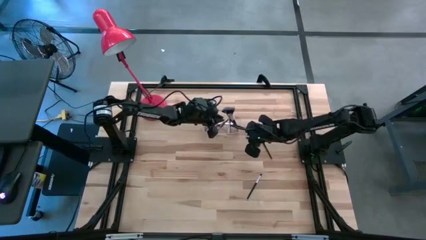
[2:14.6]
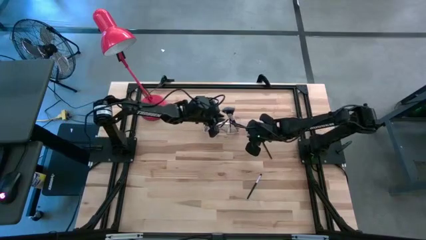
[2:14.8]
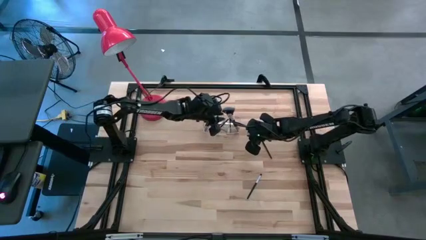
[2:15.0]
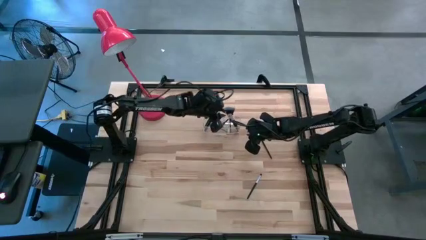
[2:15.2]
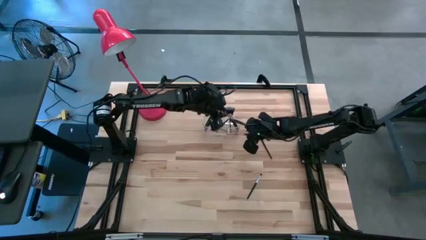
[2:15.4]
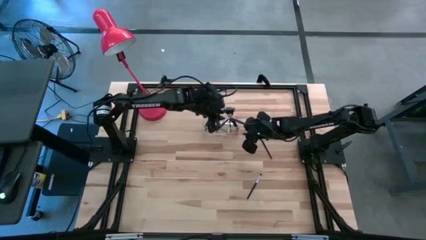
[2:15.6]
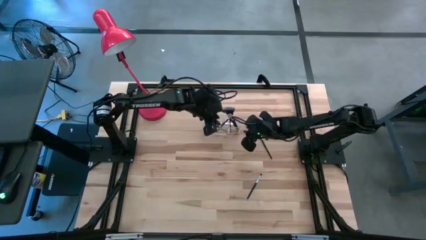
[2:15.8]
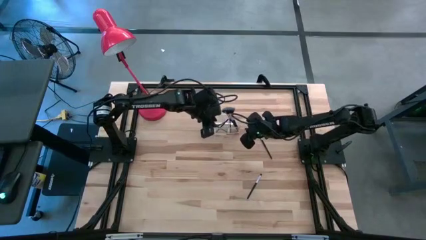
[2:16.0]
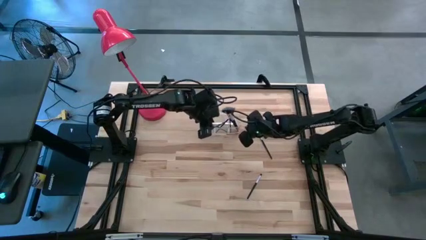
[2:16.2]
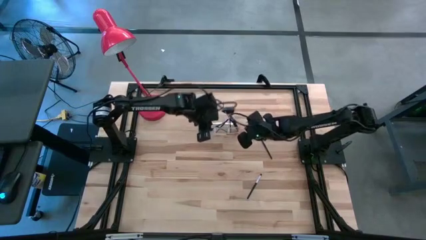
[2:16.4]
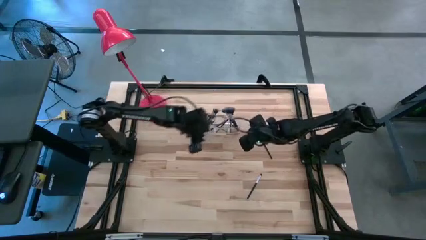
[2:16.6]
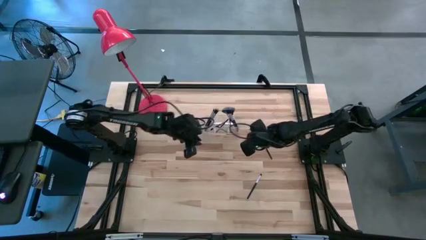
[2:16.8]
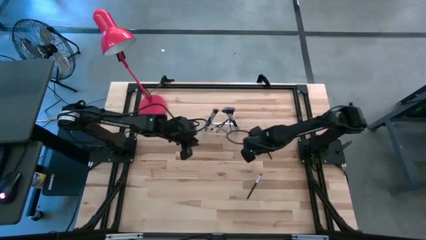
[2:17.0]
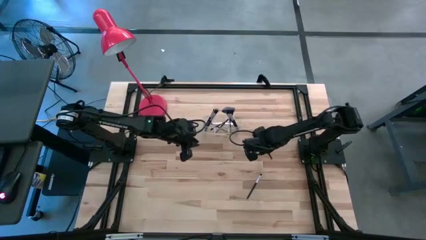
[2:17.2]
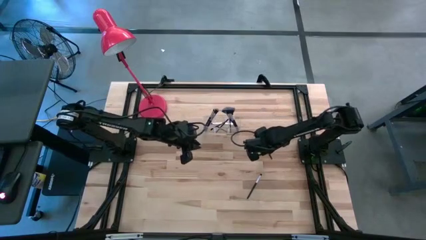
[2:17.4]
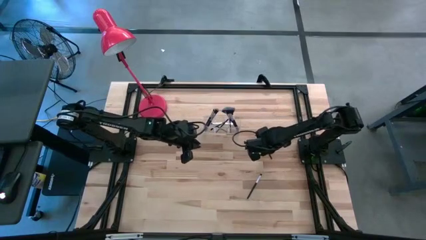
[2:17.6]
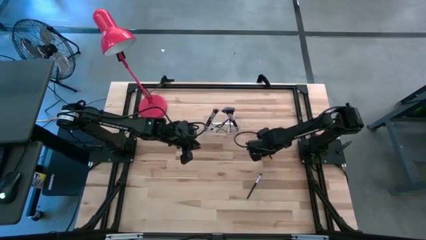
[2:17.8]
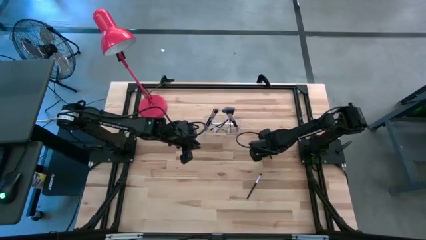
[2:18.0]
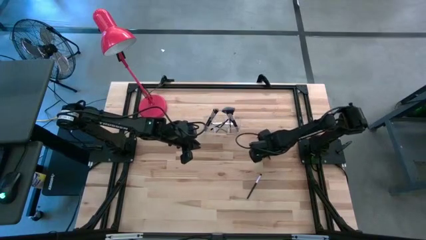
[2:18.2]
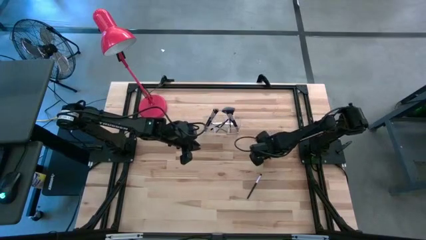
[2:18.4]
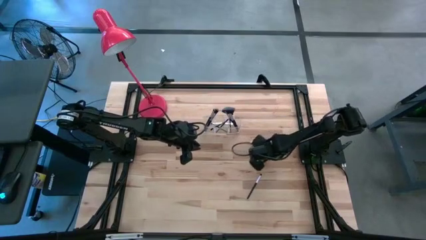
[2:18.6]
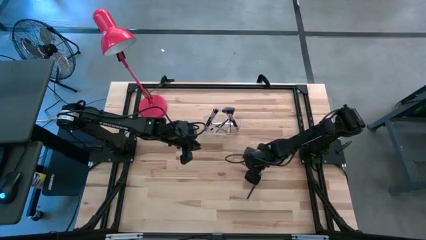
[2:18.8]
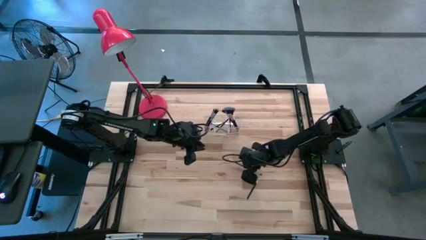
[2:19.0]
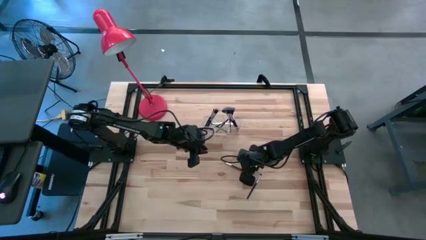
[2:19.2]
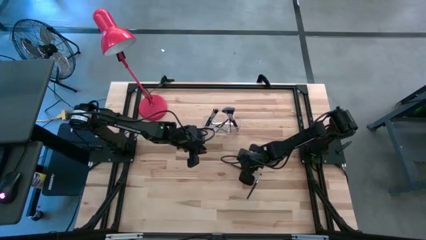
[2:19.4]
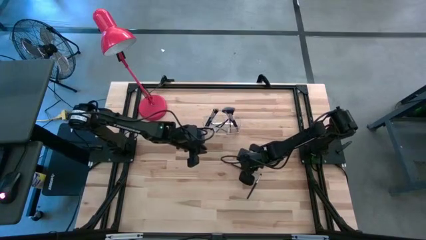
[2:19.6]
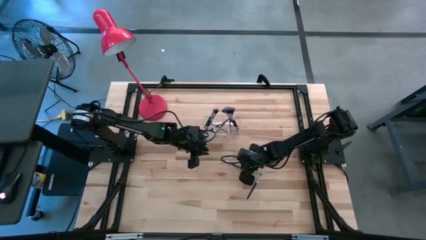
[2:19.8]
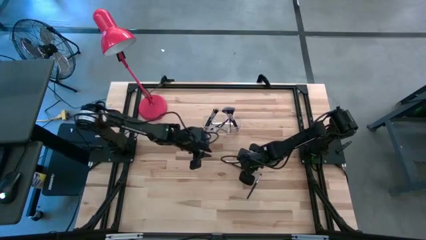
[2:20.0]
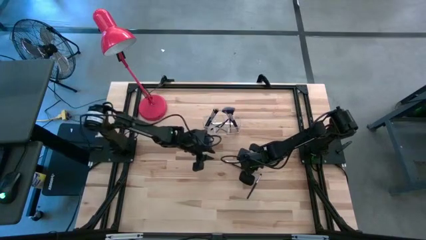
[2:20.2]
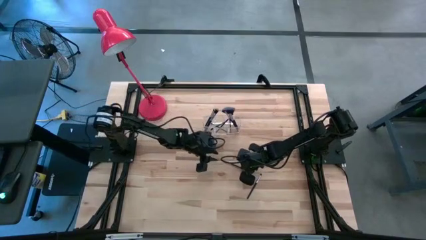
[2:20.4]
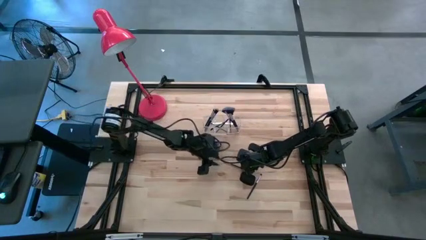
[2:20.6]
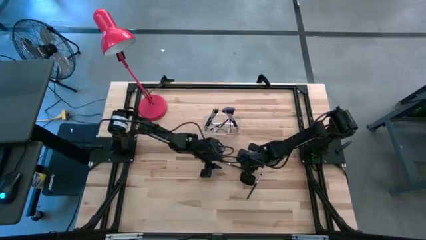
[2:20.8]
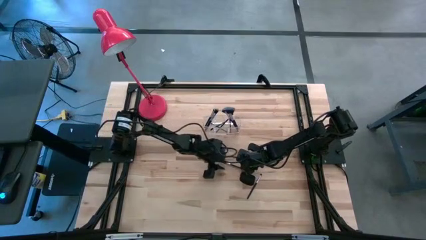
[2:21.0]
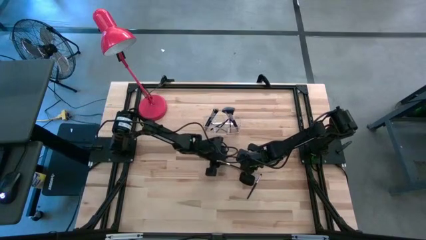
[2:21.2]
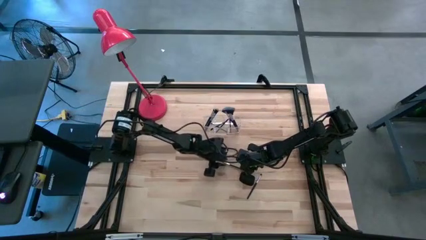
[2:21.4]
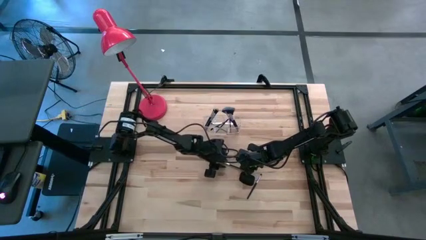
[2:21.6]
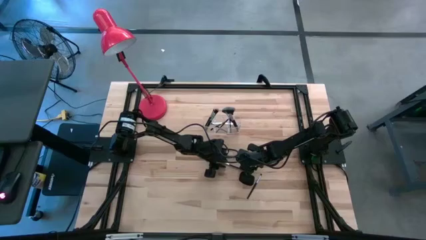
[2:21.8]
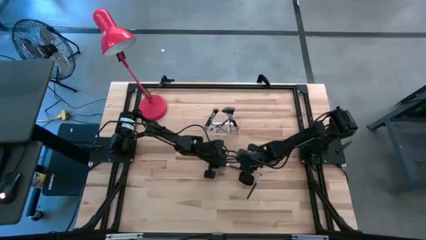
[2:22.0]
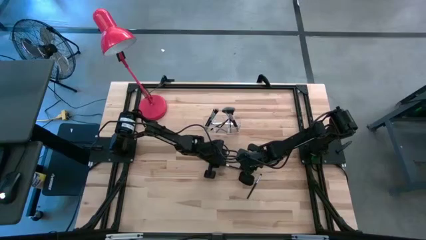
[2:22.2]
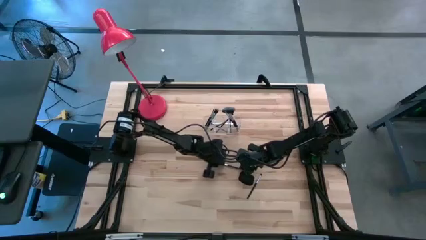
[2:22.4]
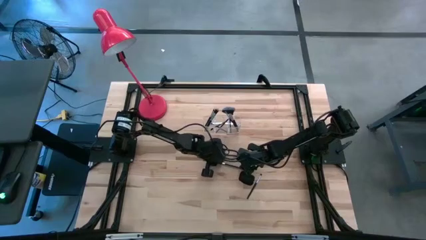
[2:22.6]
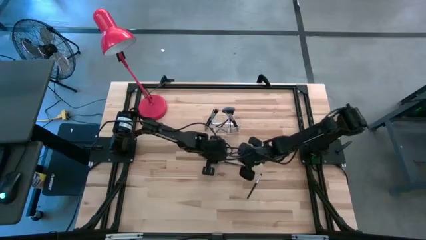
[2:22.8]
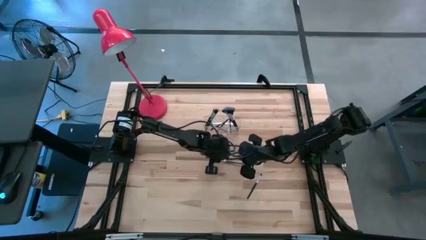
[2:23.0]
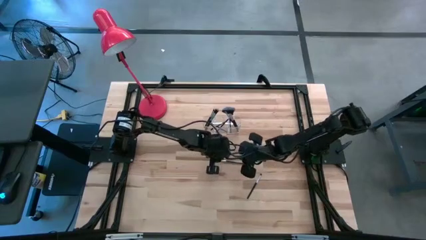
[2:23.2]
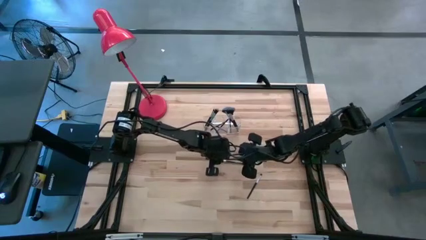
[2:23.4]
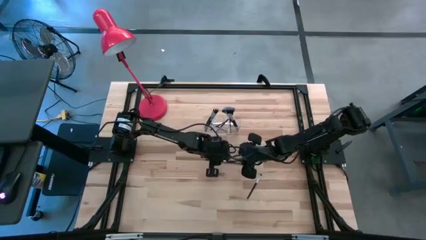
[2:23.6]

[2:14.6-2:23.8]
Task: Pick & Place Makeup Supplies
Put the makeup brush into the transparent organizer

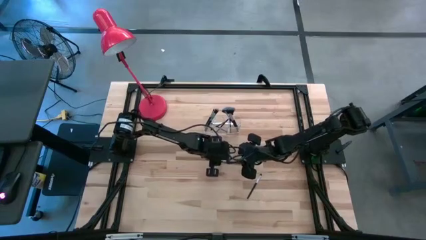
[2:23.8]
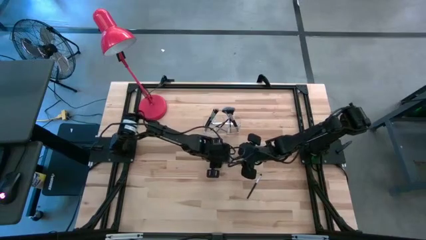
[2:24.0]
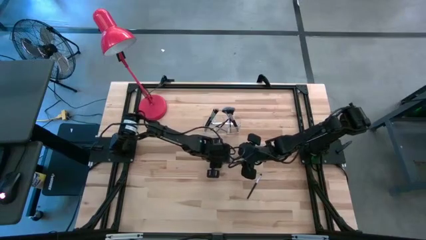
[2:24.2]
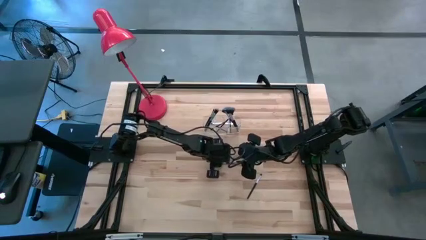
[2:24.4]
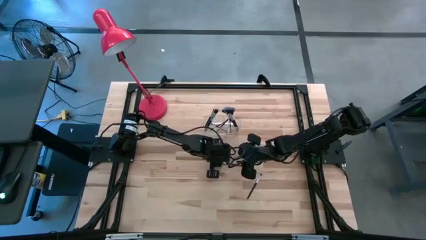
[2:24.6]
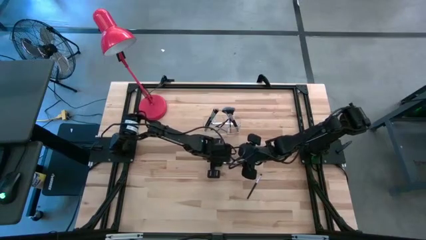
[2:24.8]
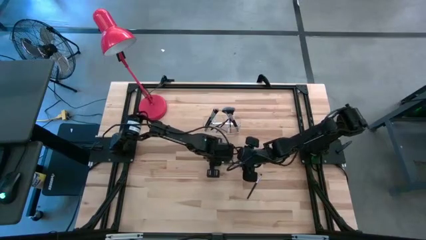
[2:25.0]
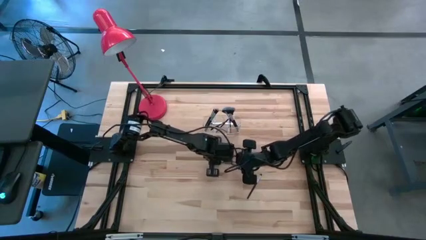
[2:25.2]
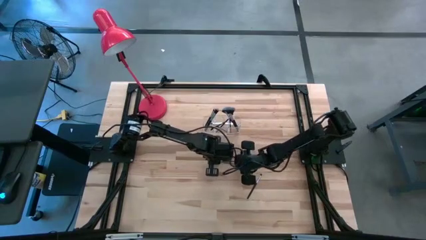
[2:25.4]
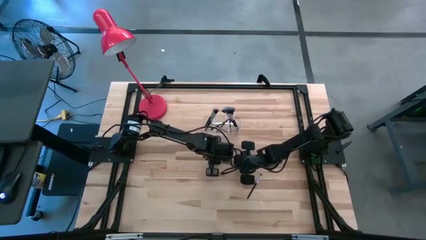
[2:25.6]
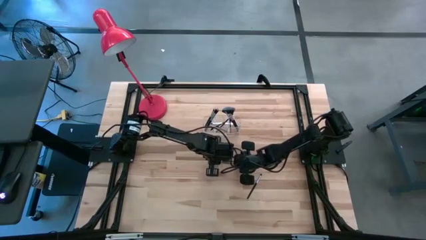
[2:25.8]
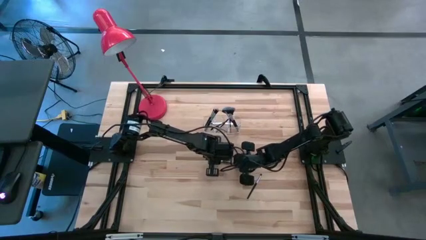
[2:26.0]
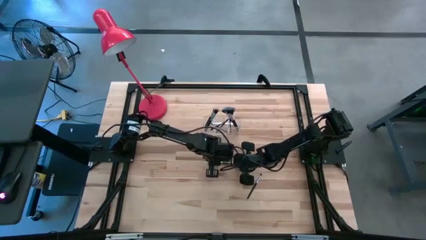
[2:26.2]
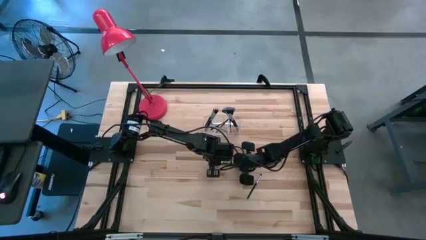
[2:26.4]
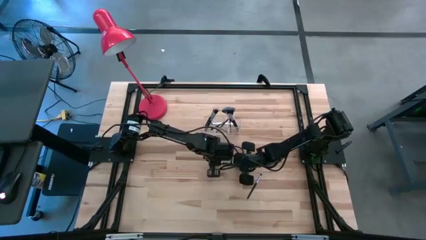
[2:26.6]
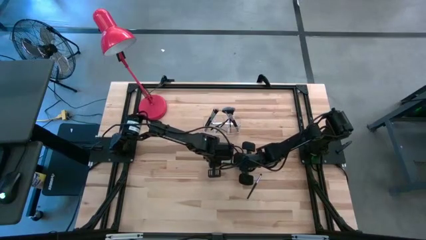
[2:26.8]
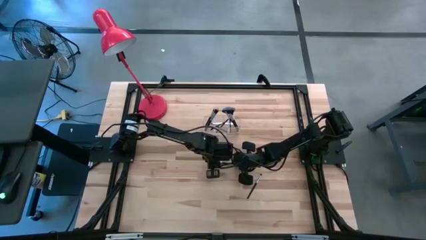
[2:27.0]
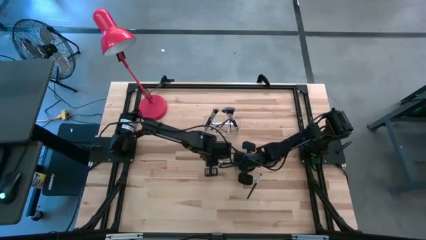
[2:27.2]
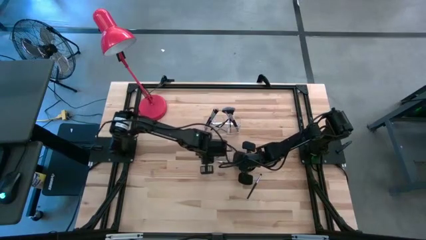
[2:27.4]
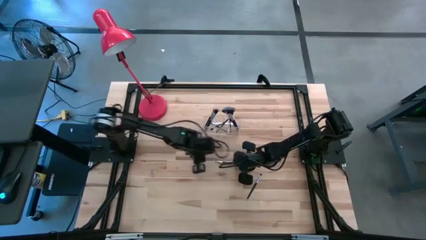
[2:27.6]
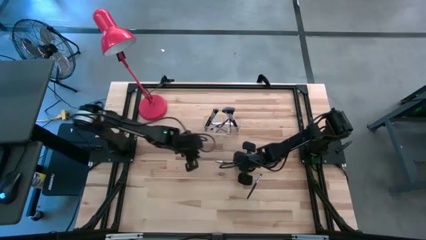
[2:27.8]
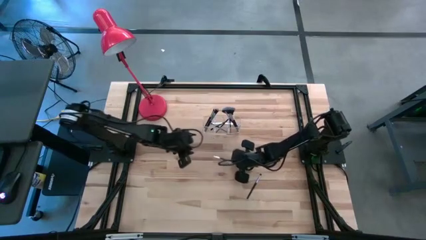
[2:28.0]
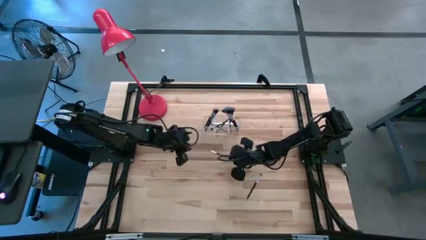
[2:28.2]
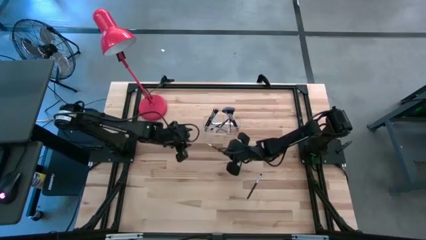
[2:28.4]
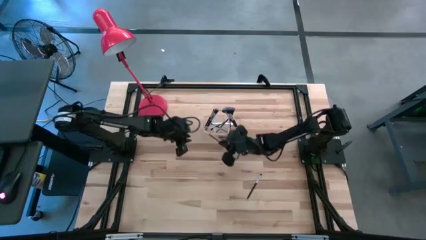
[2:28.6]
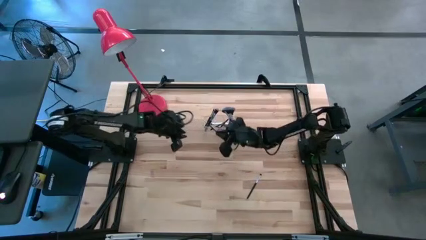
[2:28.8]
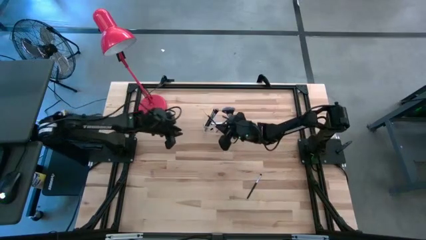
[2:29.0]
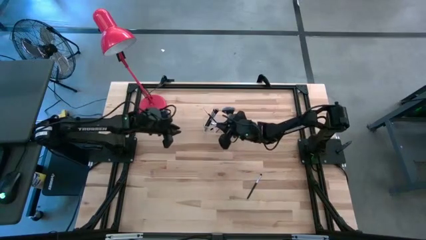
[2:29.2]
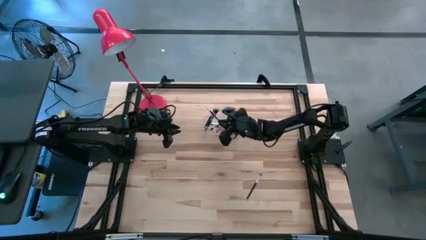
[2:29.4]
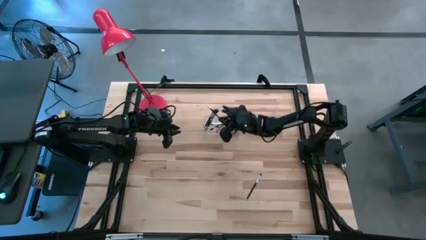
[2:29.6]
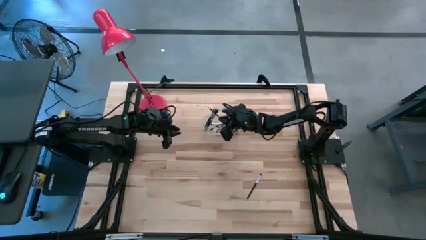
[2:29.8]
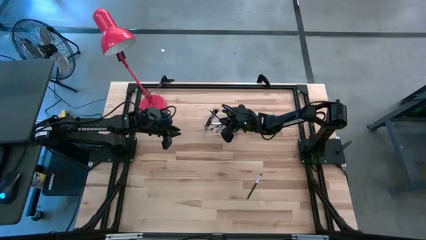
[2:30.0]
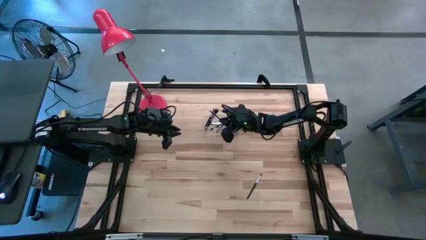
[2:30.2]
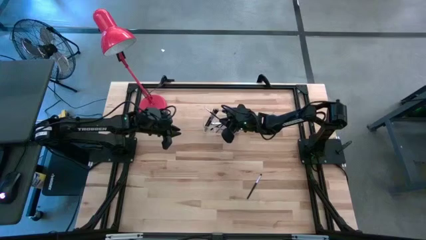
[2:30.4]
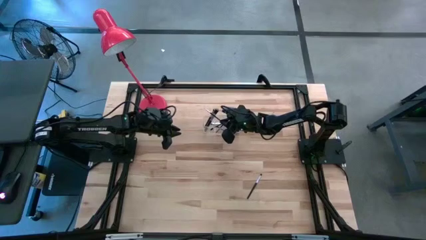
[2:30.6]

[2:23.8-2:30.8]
Put the makeup brush into the transparent organizer

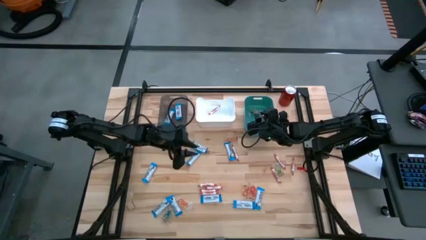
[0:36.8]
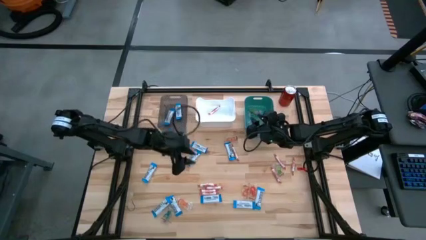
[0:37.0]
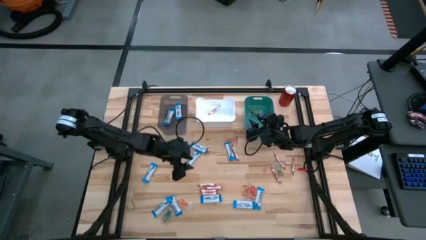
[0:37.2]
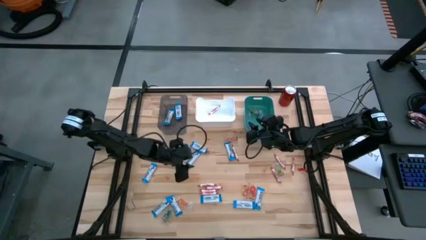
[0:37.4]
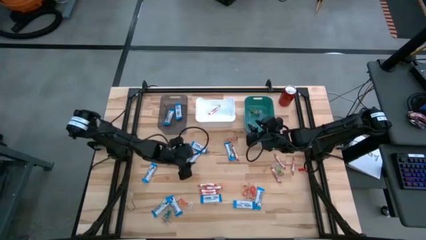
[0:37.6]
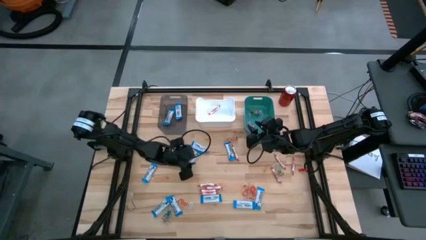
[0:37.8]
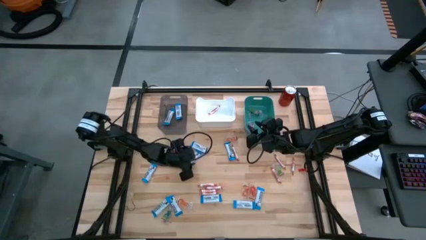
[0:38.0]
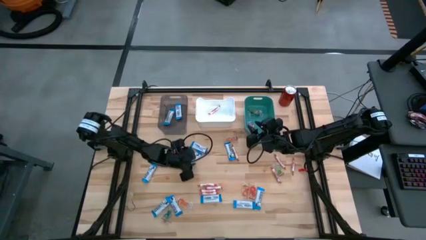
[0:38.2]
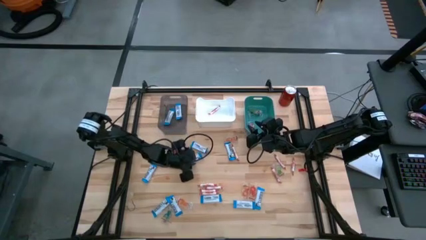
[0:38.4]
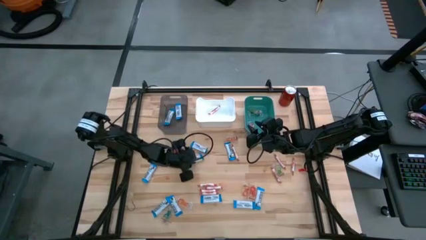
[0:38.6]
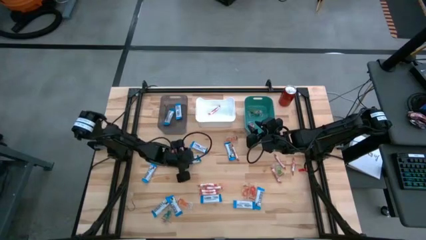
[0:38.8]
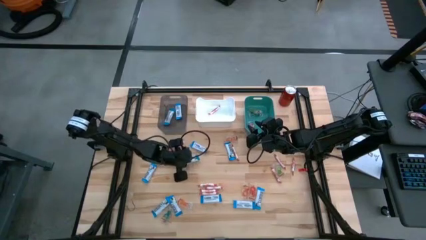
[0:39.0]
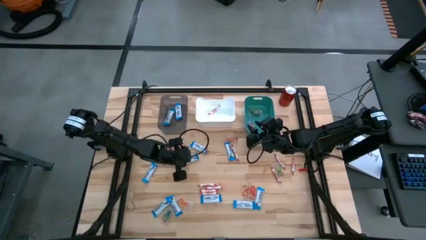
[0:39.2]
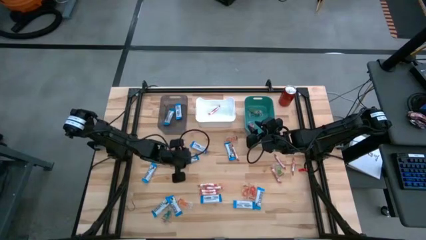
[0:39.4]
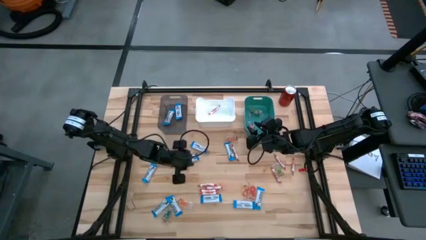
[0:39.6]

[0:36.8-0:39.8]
Task: Sort candy
Put the white chocolate into the gray bin
